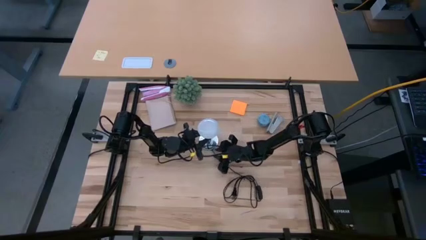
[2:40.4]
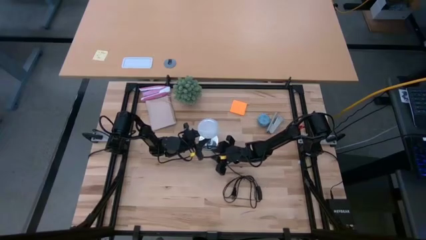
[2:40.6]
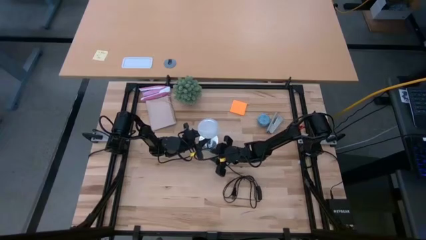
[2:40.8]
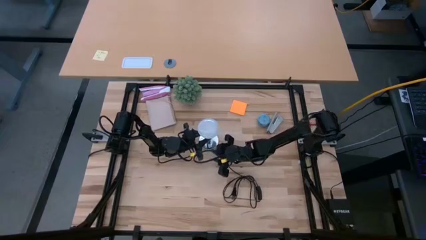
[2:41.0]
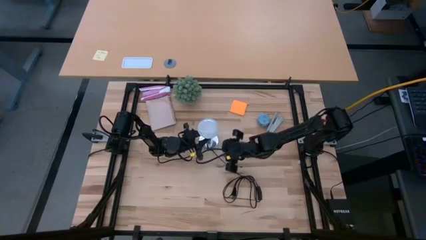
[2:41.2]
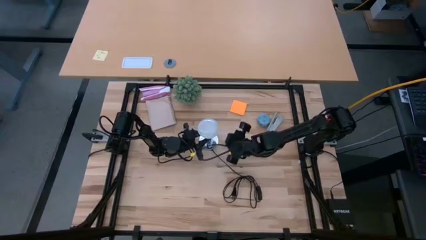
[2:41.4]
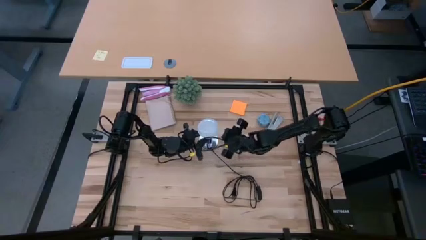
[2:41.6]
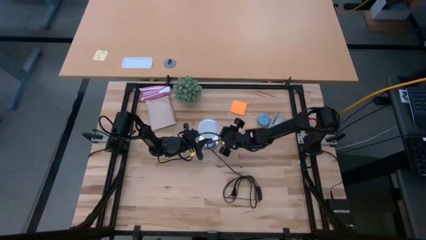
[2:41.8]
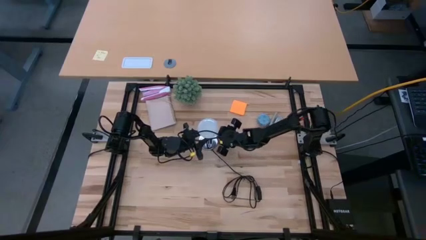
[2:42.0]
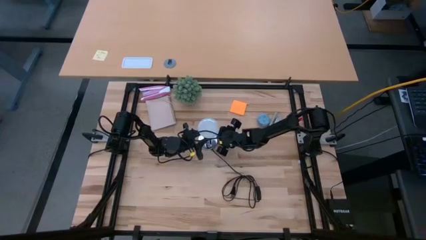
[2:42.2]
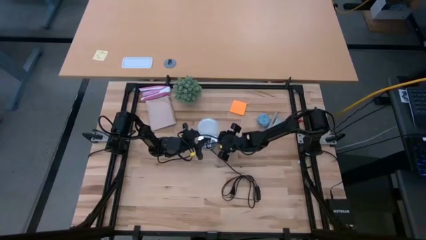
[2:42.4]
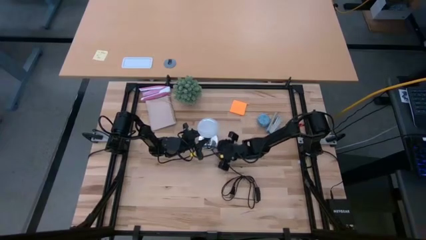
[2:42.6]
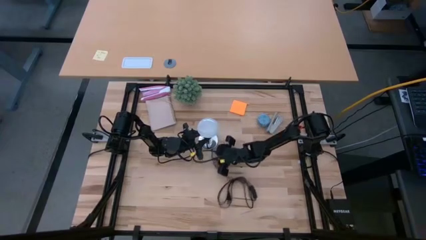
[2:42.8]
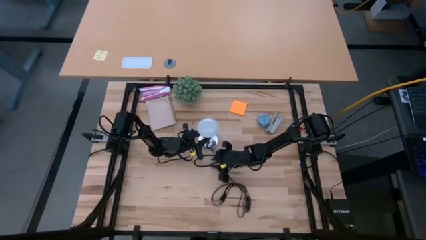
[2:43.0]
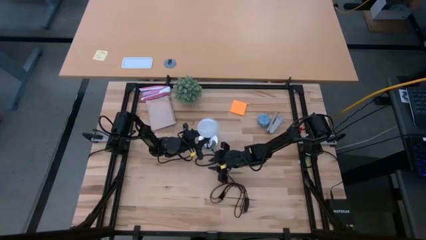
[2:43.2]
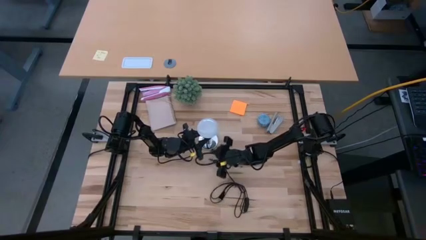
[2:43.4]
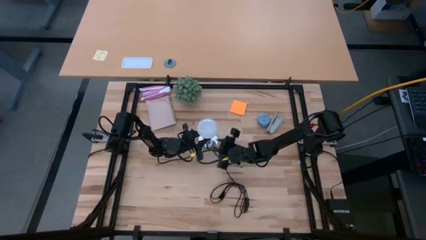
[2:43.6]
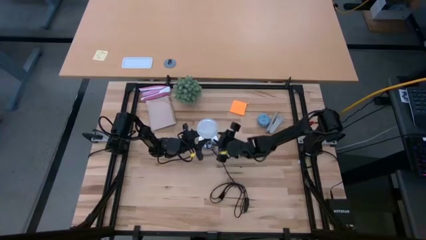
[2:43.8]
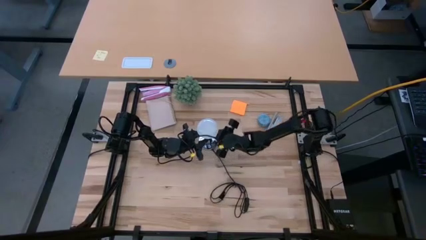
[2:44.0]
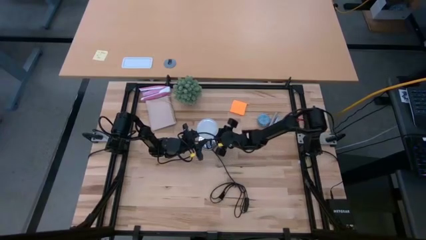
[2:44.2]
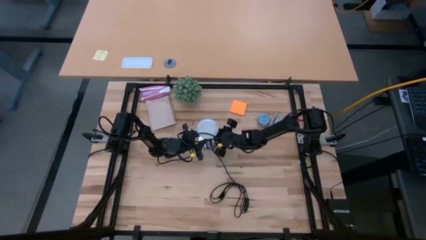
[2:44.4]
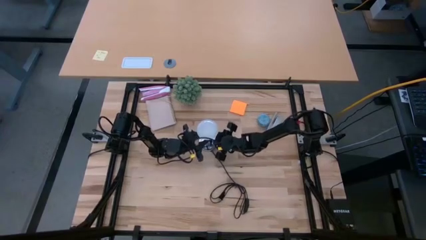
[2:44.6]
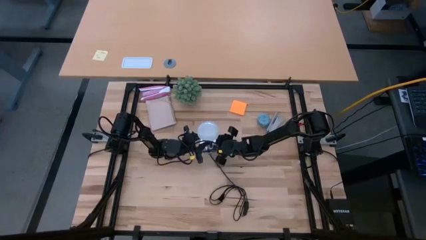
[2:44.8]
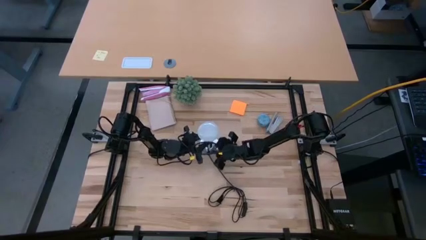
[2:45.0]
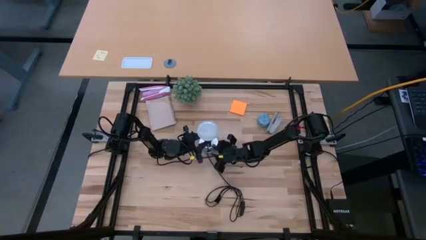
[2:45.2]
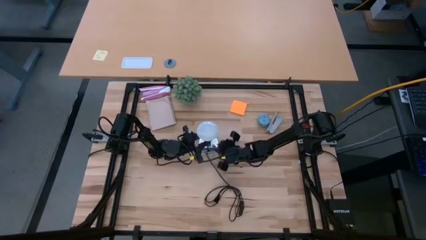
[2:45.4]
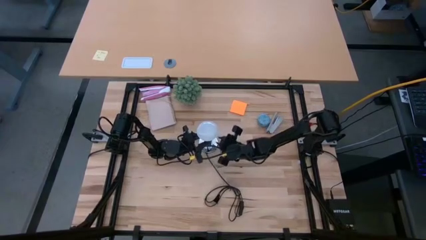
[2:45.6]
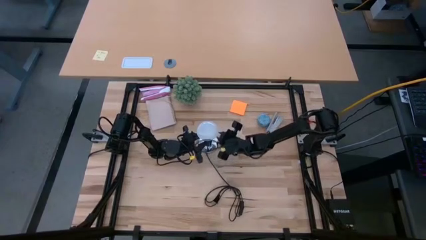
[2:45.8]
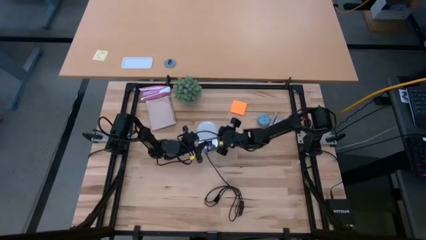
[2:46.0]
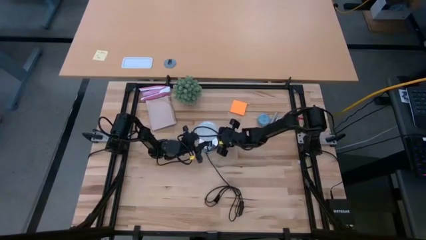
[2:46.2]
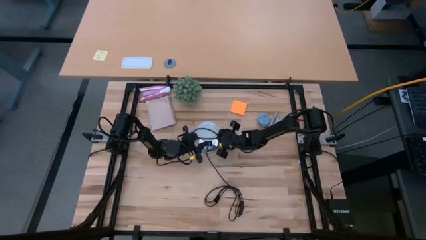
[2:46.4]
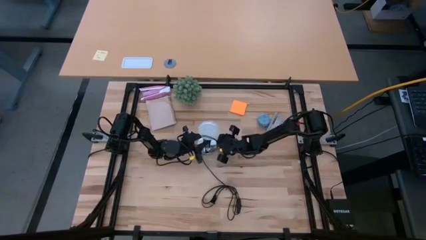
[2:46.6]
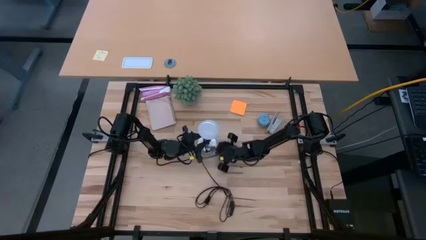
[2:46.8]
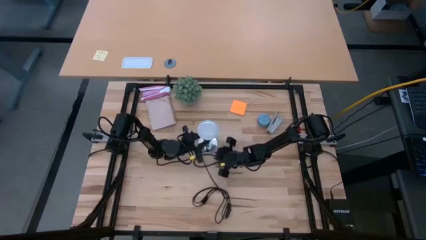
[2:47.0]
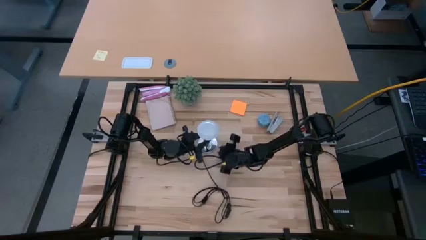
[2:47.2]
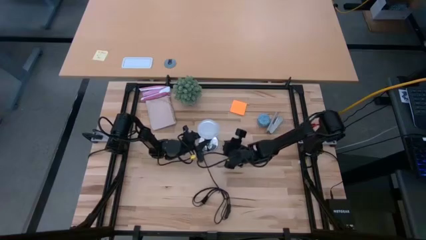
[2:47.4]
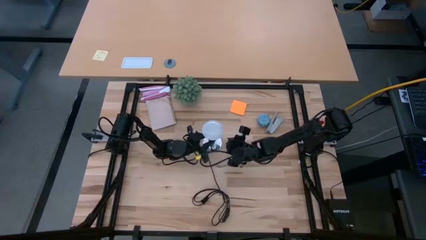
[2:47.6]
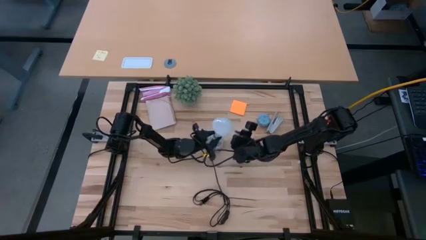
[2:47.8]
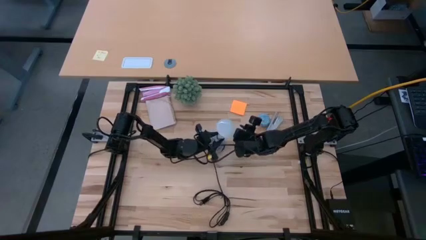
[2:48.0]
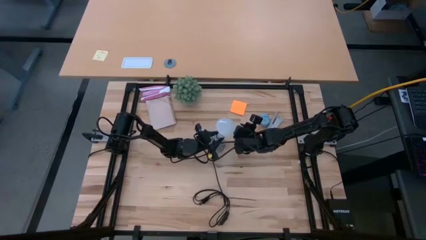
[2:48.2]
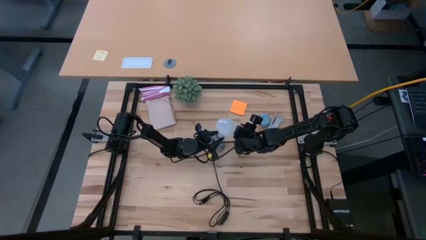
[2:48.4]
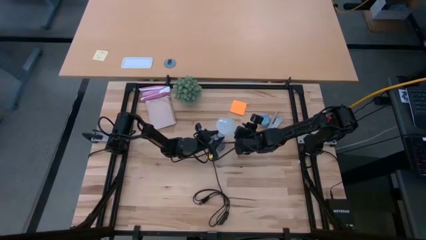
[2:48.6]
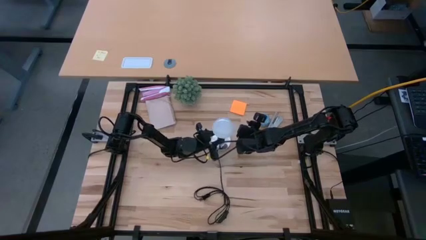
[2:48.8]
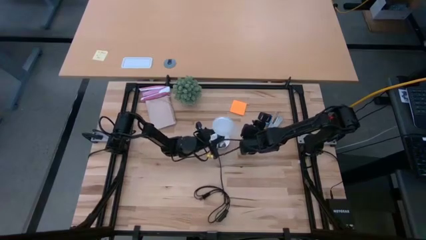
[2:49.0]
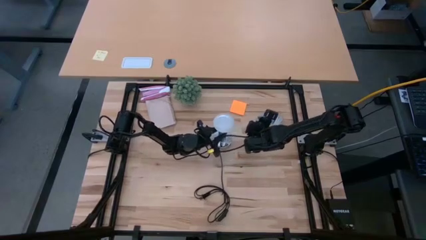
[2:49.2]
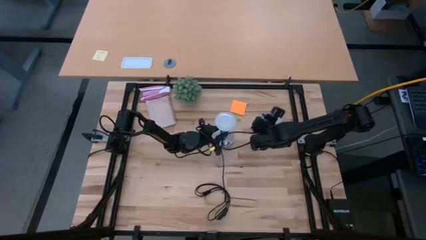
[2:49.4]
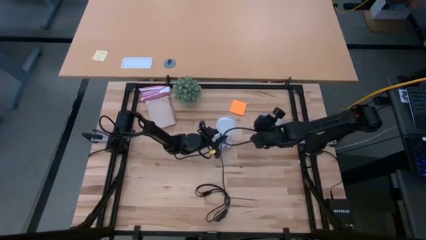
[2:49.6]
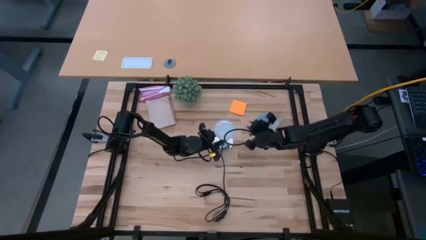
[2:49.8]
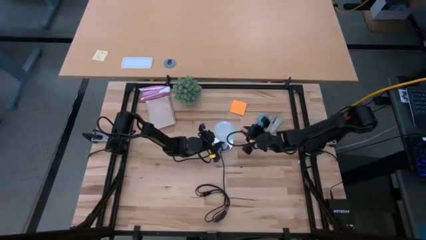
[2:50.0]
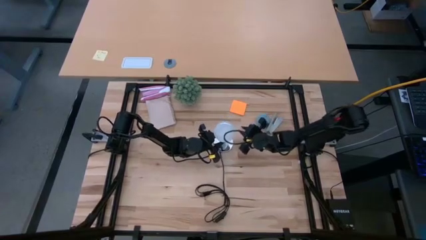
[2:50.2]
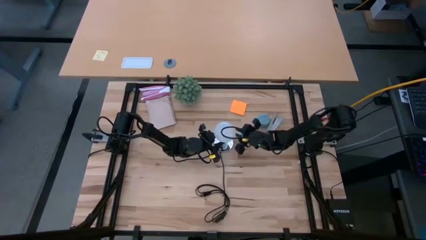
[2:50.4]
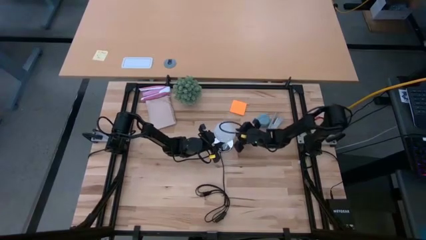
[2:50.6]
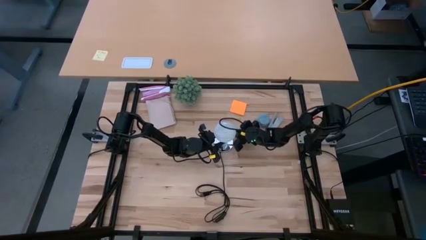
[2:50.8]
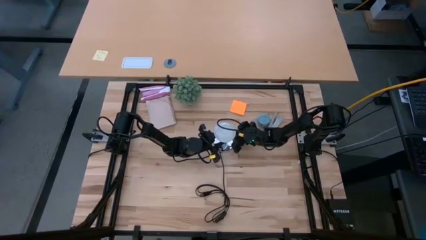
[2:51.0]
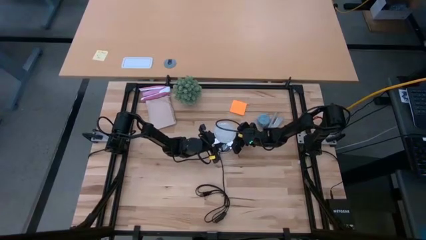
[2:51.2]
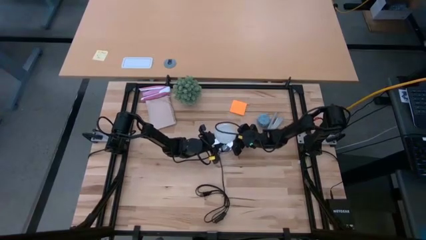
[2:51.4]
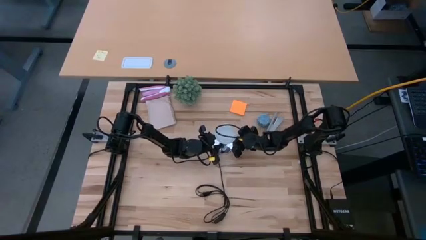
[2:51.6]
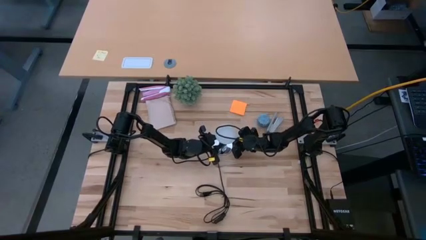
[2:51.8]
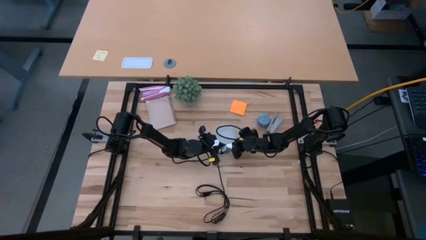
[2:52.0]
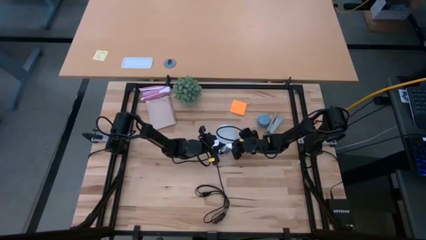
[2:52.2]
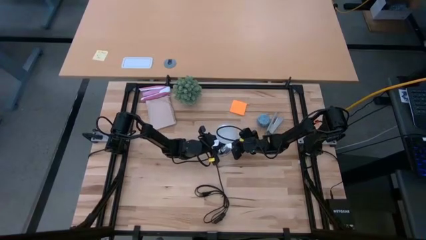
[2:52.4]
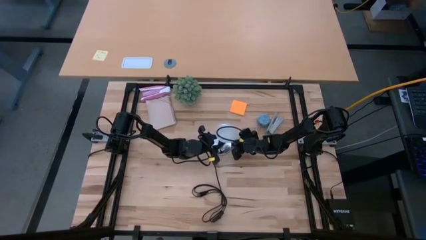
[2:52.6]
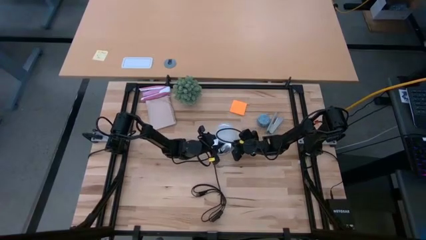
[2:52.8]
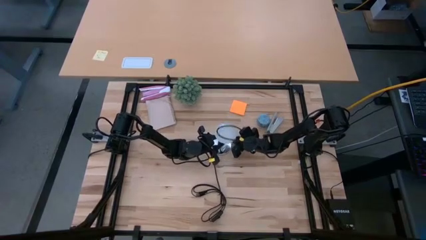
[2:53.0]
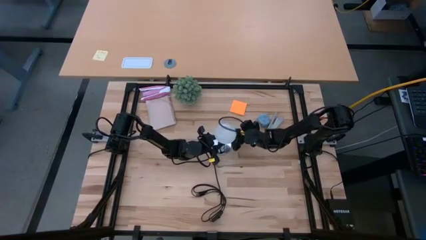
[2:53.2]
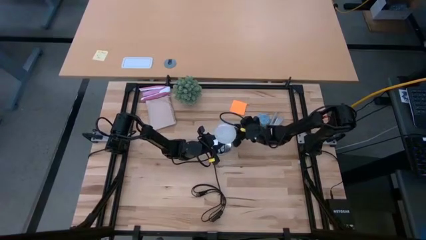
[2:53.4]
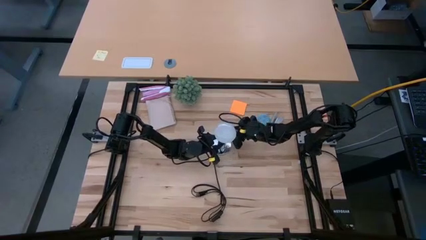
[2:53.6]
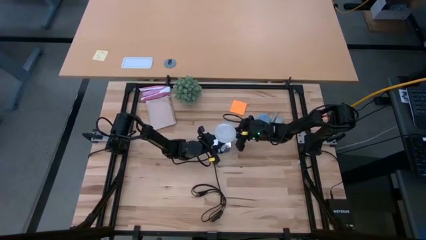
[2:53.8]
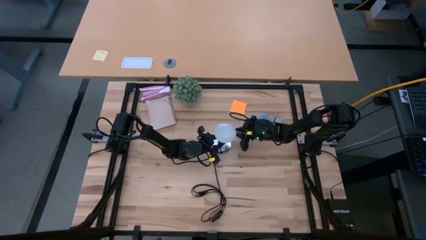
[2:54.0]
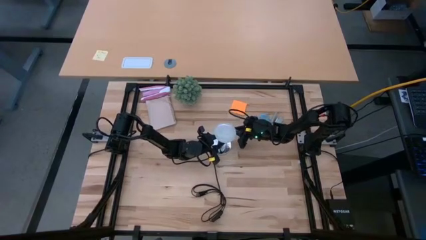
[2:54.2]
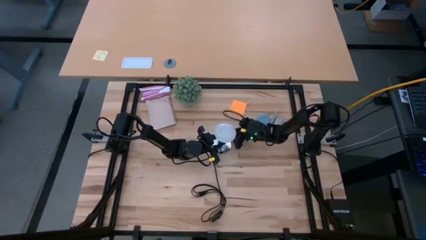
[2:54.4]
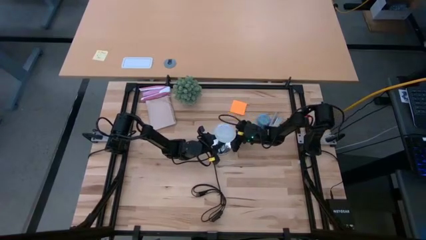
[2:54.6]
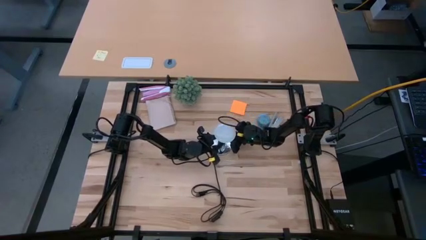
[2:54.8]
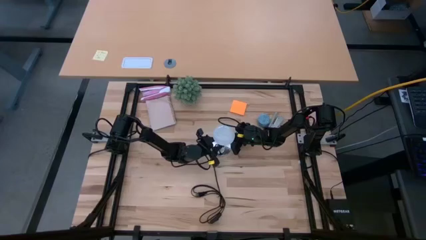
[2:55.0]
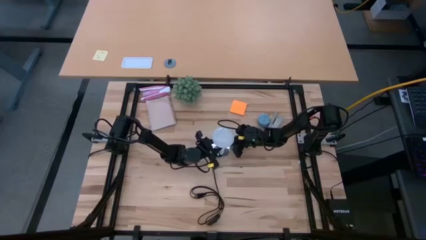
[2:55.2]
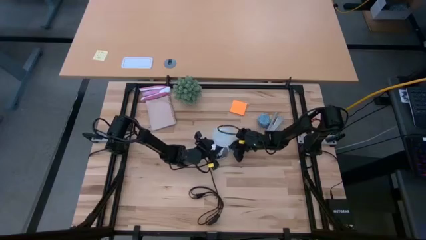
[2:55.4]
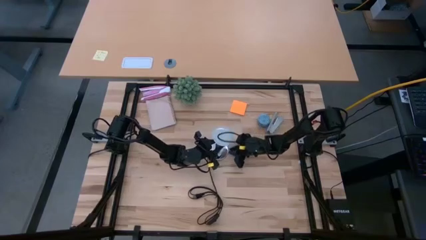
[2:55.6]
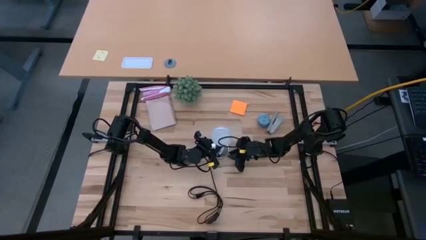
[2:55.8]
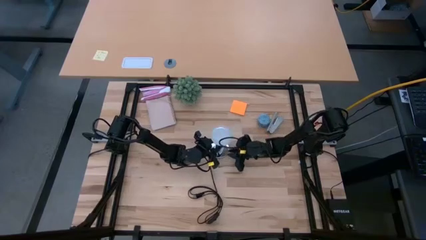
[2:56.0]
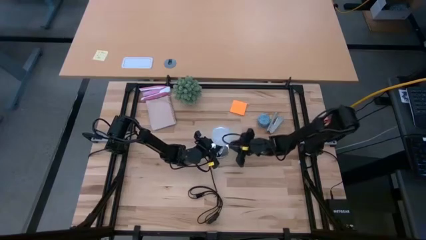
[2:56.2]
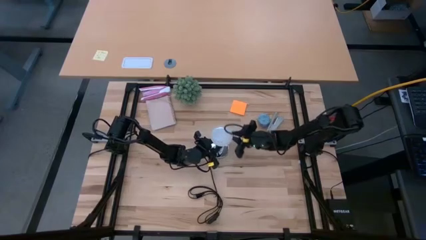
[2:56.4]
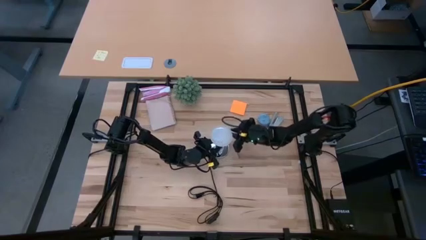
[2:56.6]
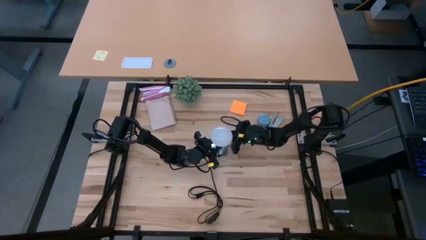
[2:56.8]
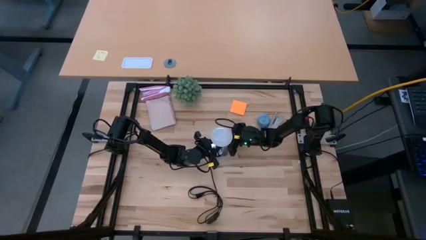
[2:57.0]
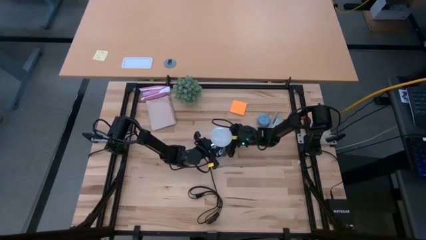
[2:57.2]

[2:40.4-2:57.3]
Task: Screw lightbulb
Remove the white lightbulb from the silver lamp
